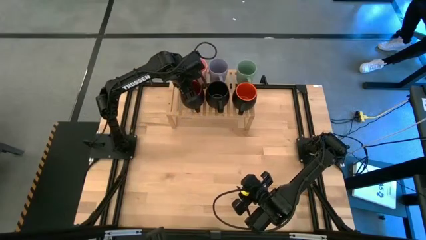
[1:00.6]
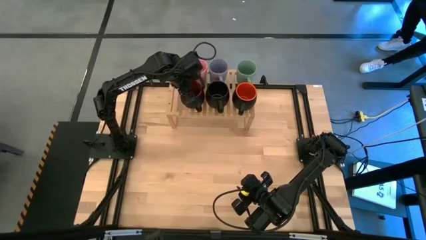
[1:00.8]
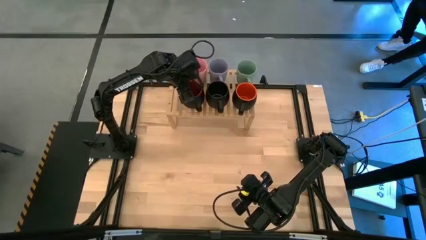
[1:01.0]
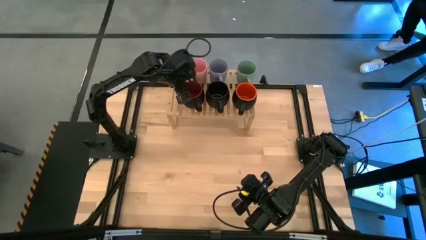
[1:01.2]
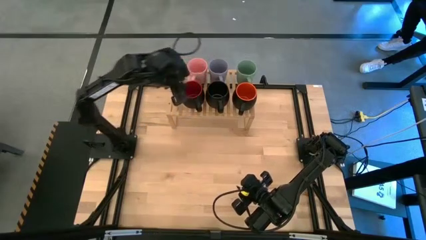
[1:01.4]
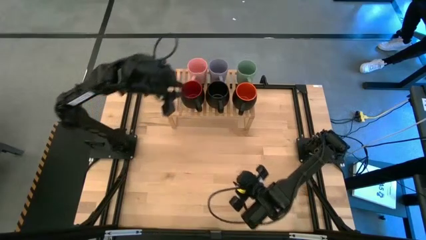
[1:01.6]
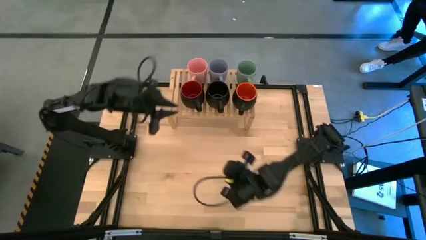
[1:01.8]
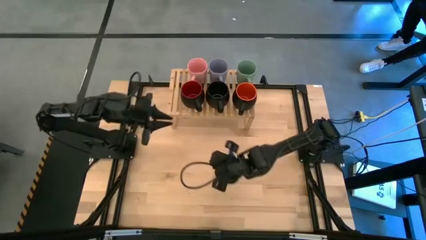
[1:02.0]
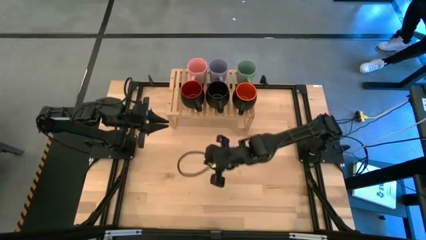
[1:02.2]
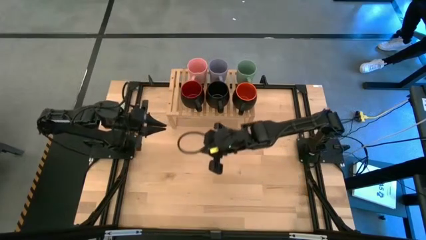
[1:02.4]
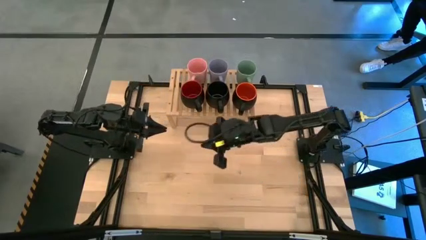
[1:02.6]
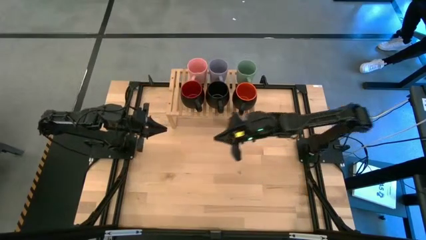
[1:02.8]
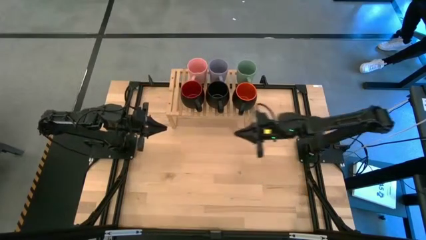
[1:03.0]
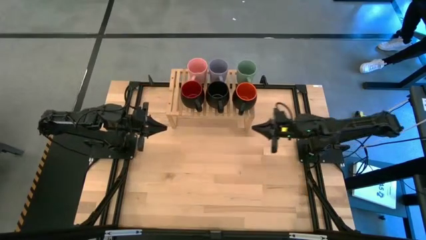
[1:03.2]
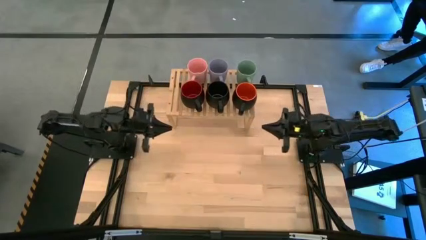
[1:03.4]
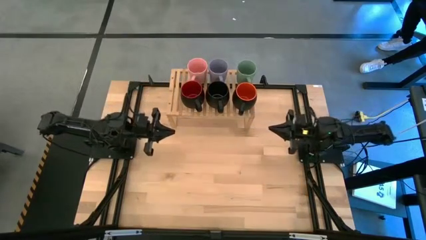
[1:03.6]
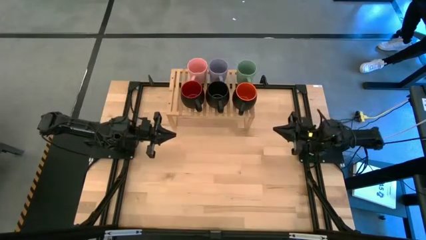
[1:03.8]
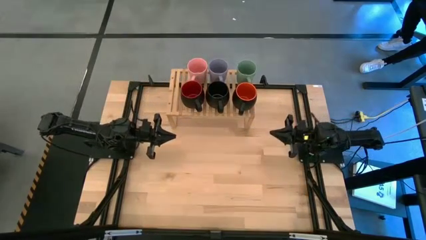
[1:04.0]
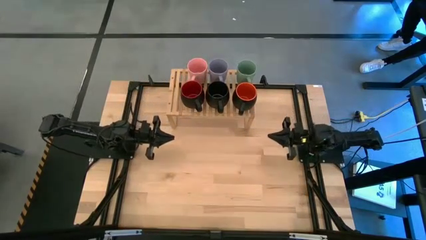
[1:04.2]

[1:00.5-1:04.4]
Task: Place coffee mugs
Return to Home Position

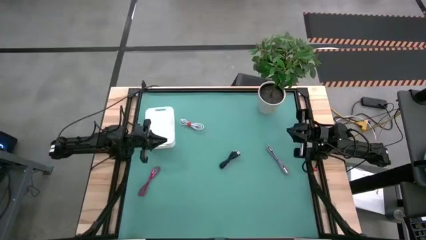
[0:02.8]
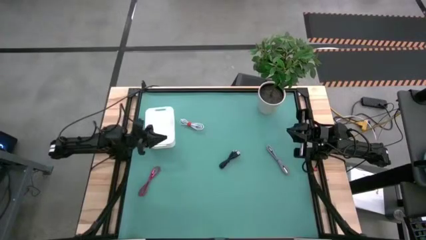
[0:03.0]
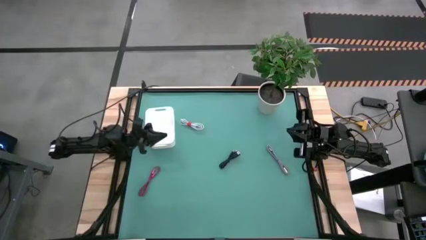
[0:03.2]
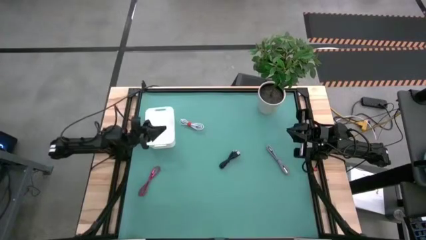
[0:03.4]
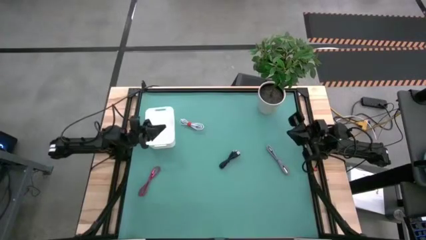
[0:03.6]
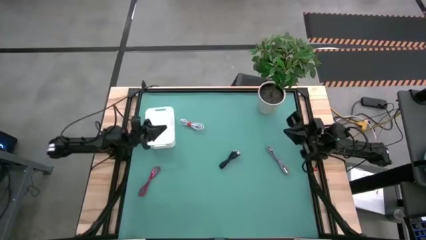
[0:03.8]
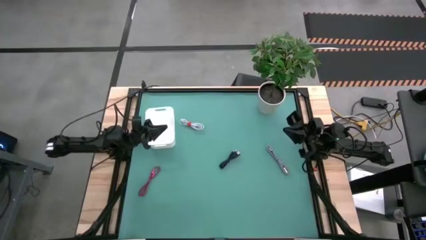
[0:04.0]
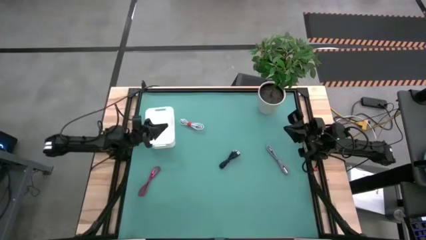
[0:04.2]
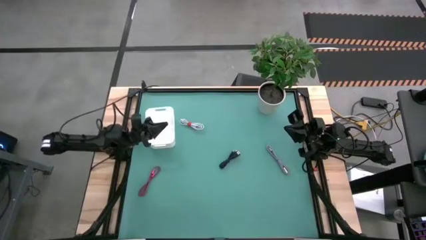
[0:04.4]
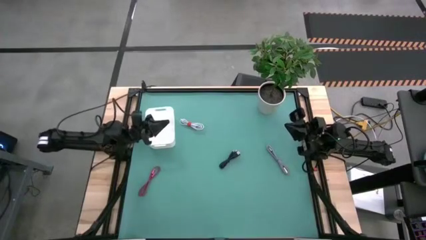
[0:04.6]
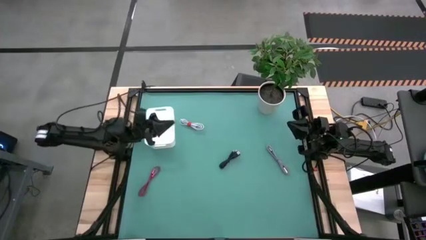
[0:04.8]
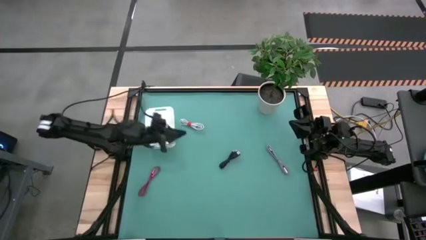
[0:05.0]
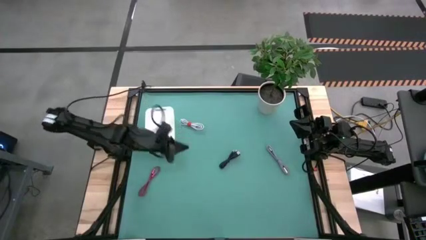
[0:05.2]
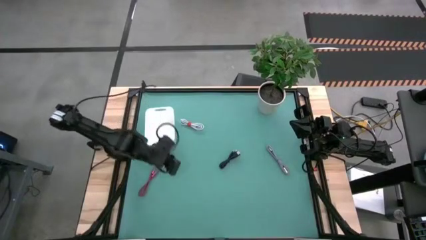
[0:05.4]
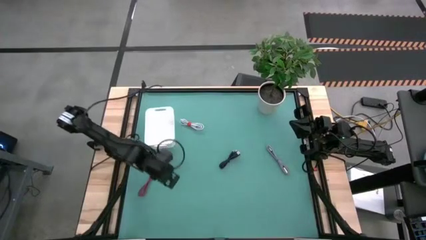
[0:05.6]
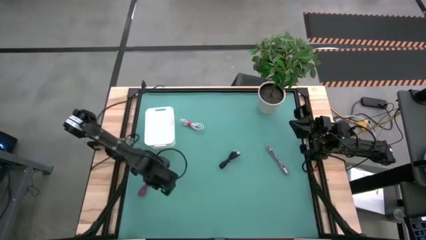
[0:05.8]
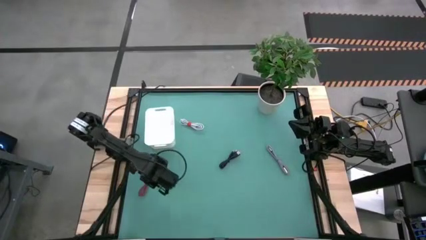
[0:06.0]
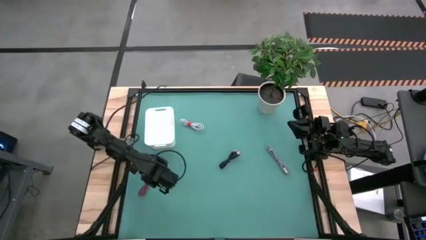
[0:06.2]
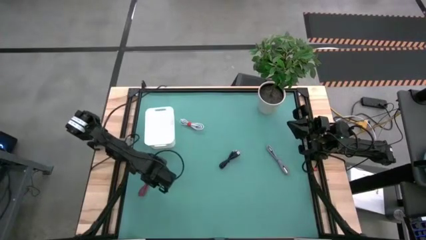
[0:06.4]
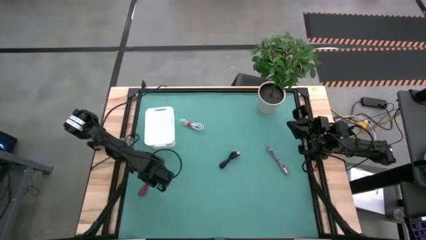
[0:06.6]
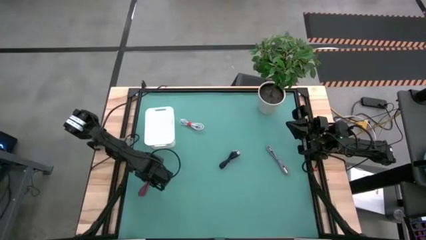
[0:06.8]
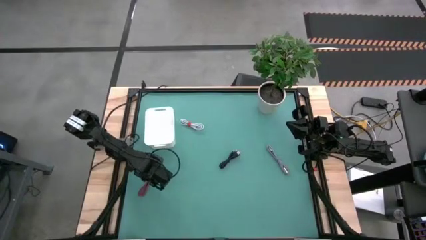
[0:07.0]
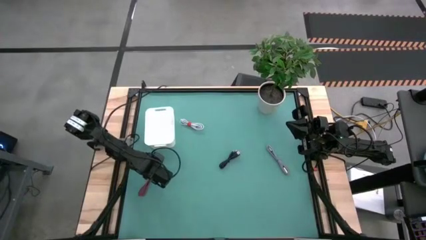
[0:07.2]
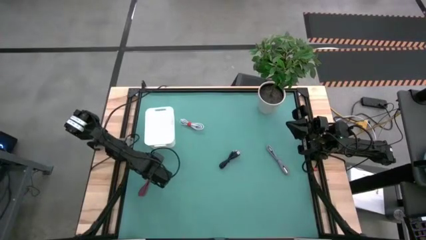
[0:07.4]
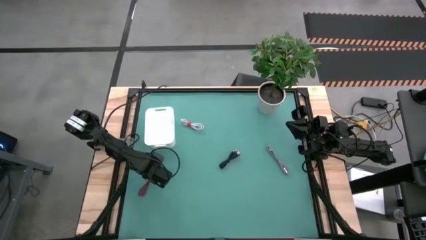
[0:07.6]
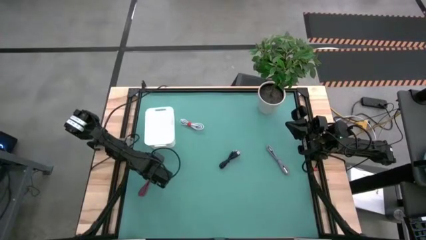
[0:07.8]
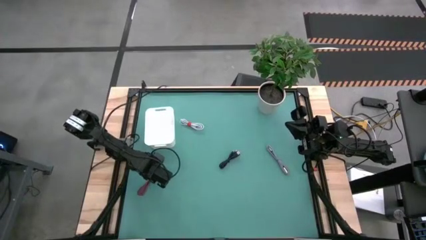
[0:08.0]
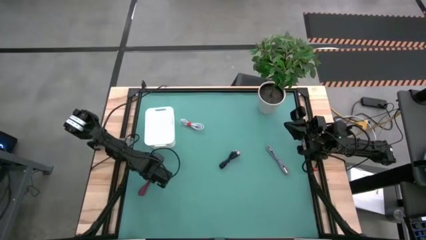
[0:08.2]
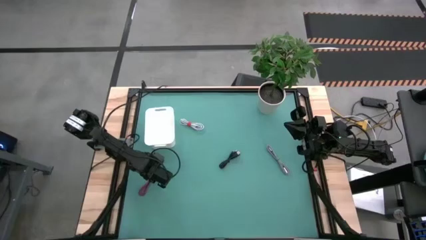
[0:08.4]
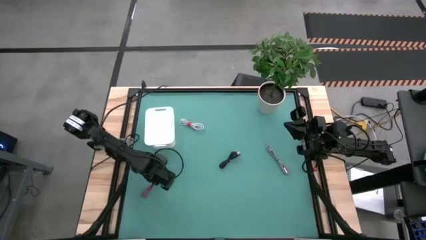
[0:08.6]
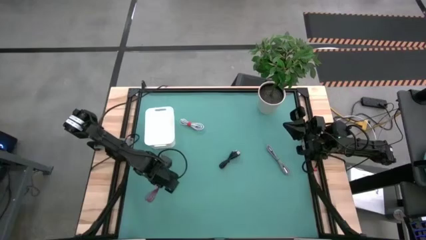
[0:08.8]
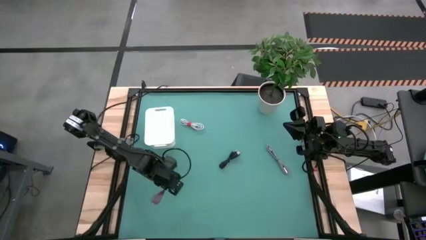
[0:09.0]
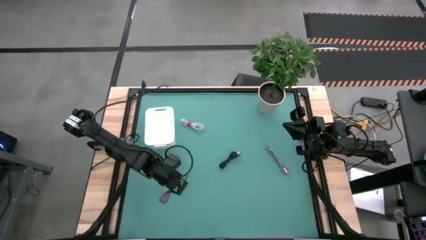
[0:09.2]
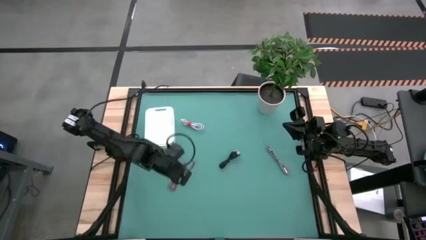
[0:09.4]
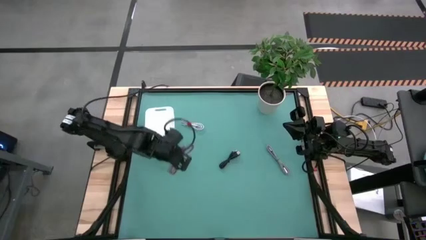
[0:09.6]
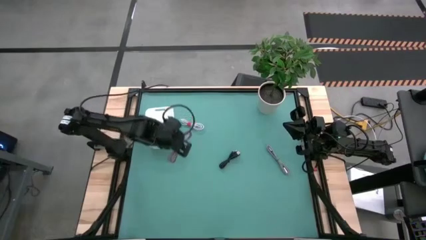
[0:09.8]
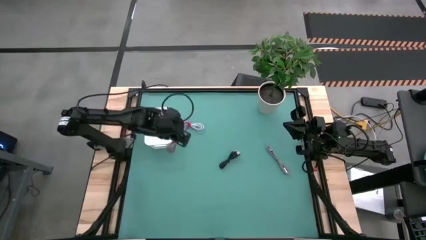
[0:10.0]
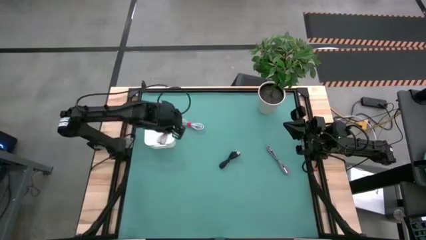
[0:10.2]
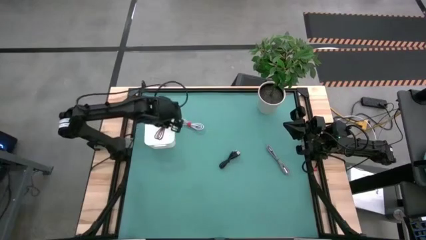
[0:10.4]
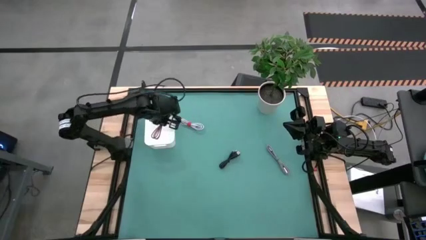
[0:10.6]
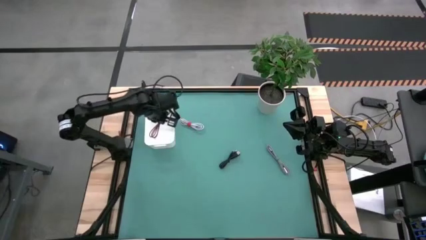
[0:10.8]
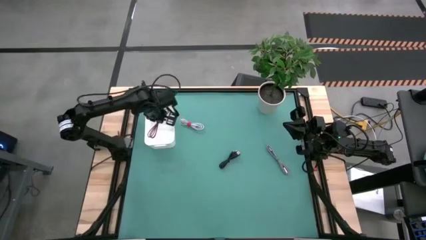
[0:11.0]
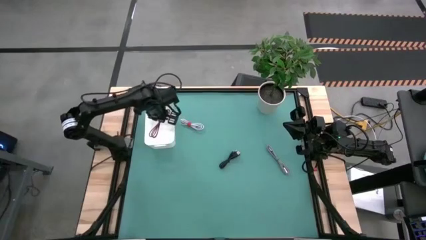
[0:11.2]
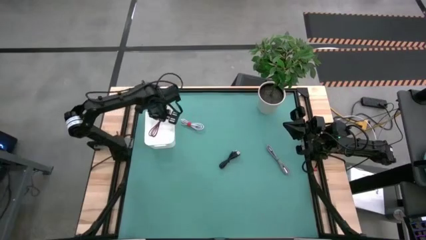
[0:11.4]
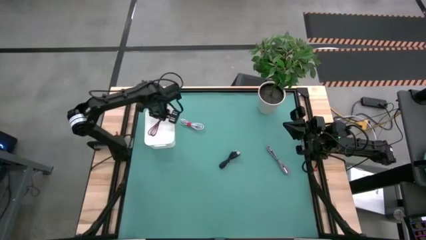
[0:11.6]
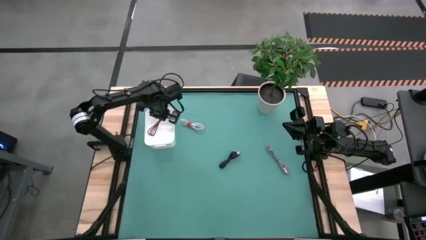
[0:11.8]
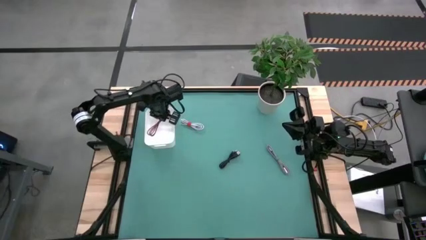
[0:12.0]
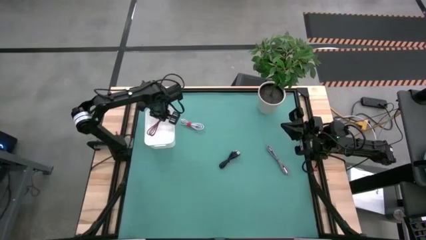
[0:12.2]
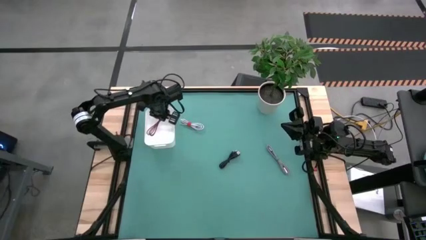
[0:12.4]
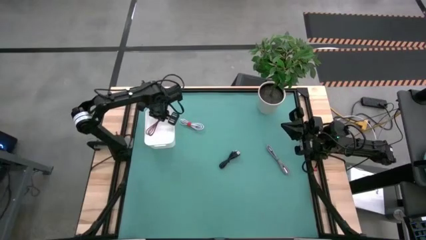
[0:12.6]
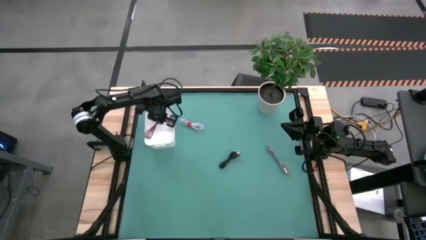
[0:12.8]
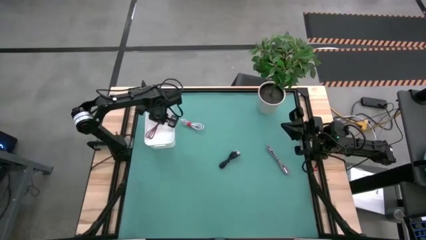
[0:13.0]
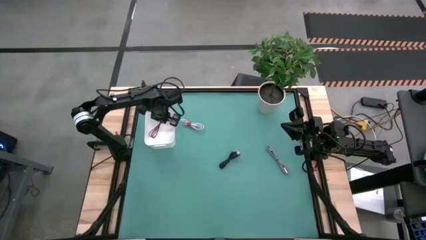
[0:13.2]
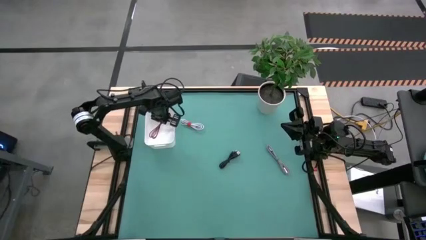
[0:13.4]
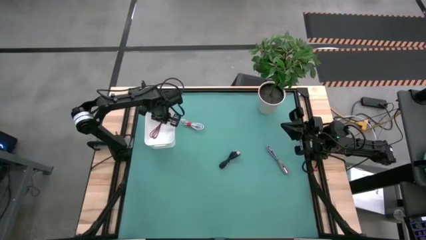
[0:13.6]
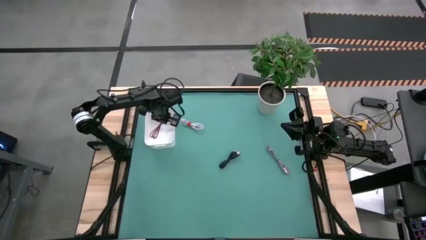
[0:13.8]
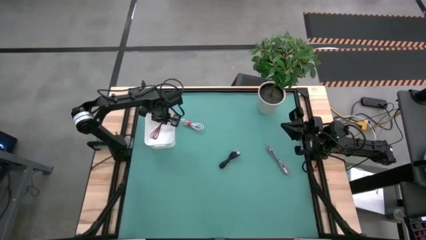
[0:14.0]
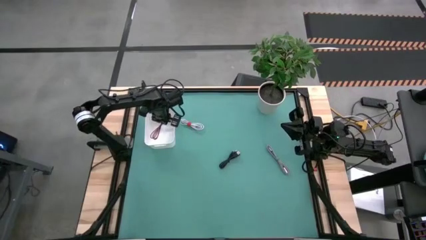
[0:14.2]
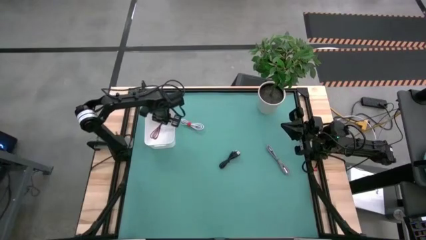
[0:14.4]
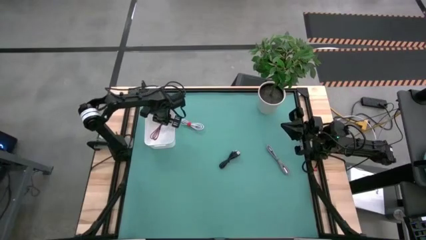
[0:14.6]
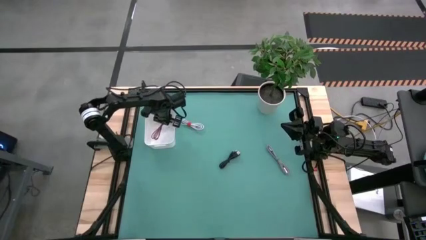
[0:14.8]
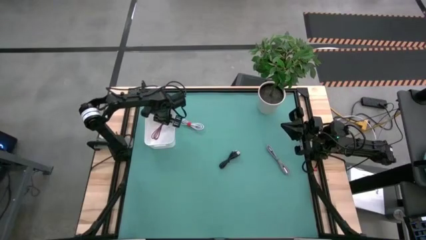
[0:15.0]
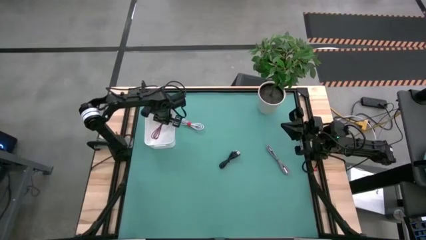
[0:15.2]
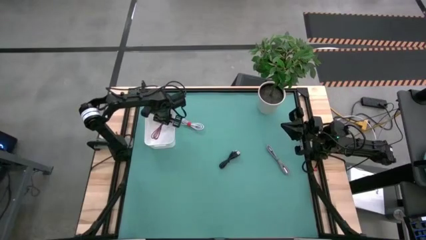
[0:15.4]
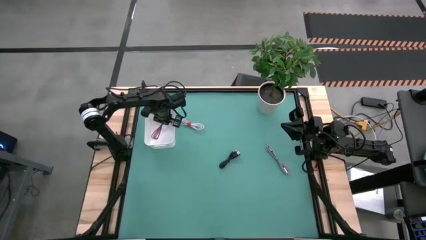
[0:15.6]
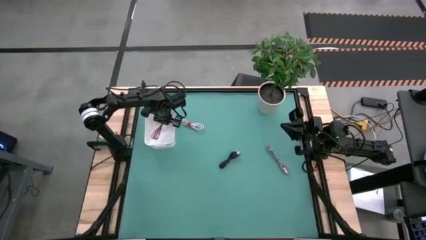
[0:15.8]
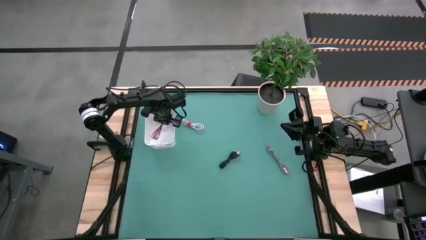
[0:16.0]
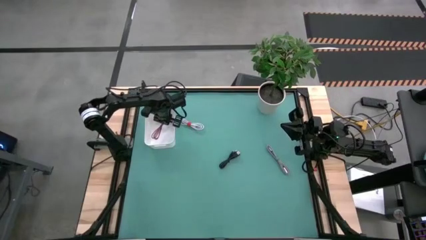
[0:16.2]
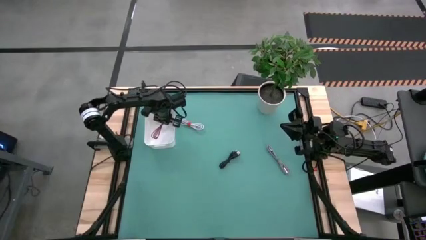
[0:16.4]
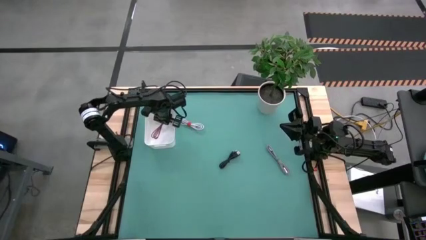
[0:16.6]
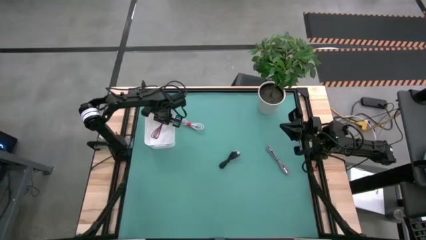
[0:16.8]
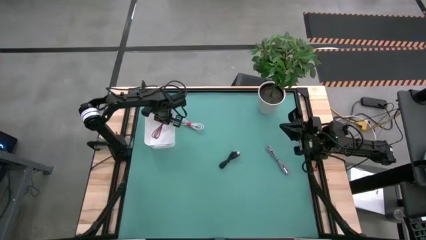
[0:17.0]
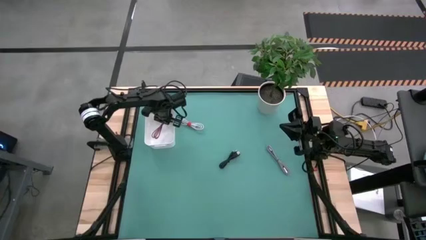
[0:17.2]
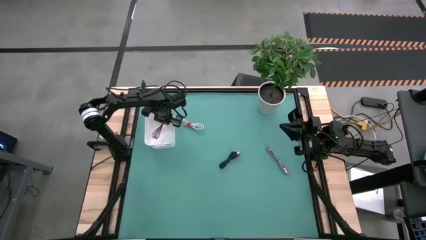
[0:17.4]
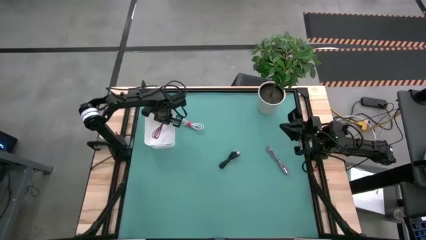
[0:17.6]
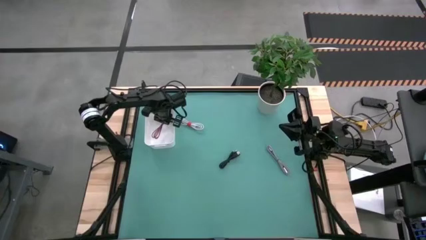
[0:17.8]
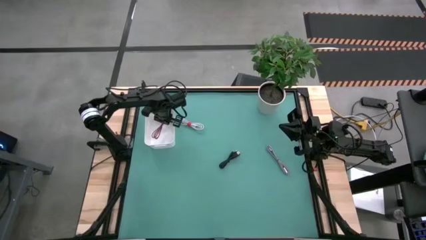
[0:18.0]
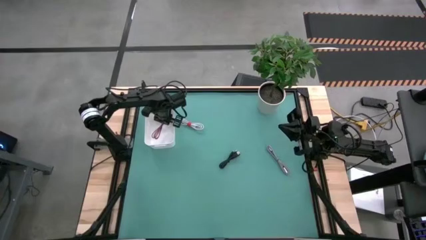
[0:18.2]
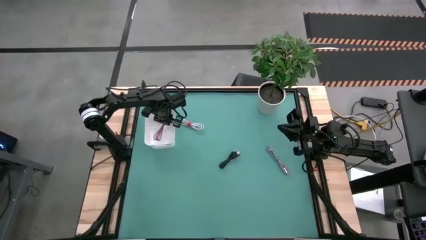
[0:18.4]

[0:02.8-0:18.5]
Task: Pick and place USB-C Cables
Put the red charger cable into the white bin
